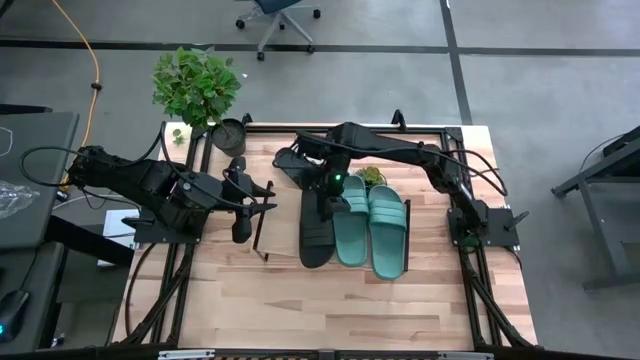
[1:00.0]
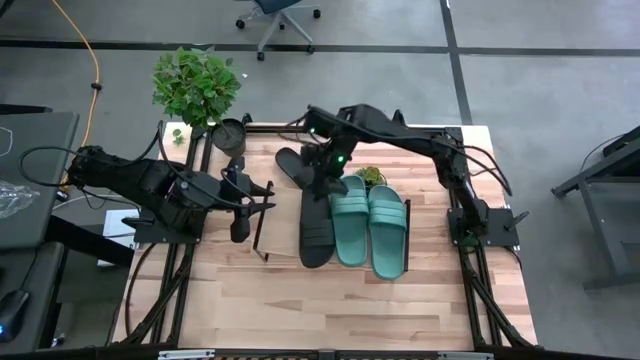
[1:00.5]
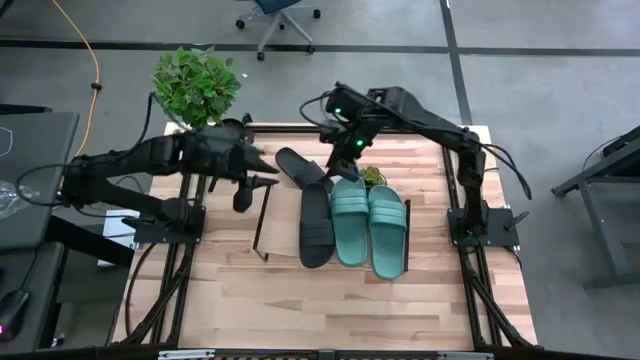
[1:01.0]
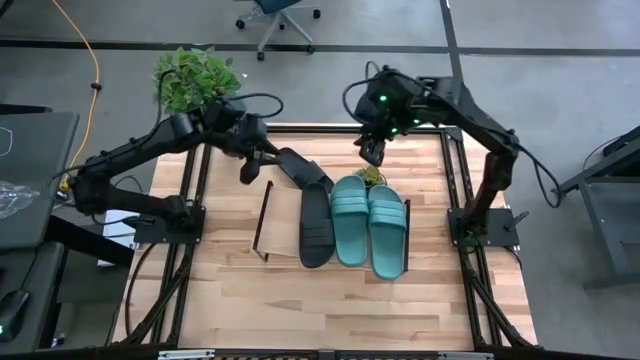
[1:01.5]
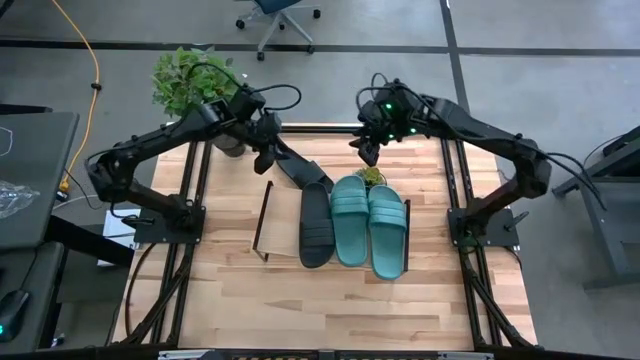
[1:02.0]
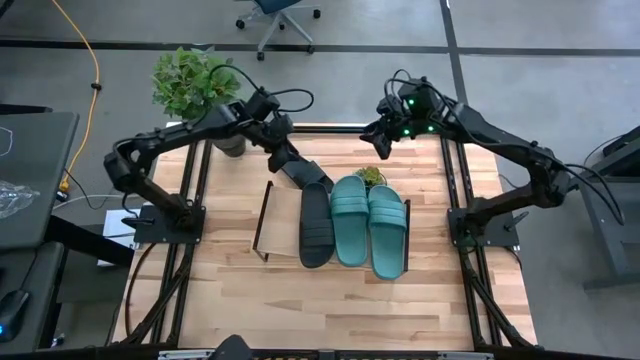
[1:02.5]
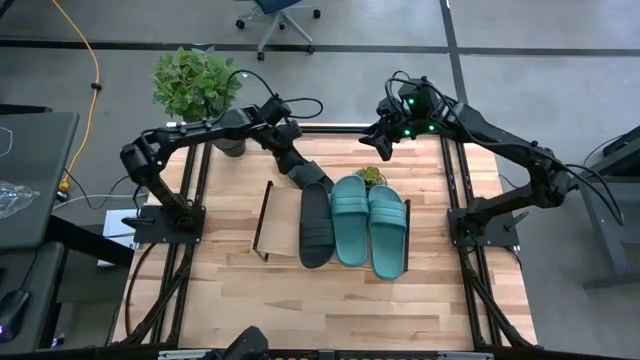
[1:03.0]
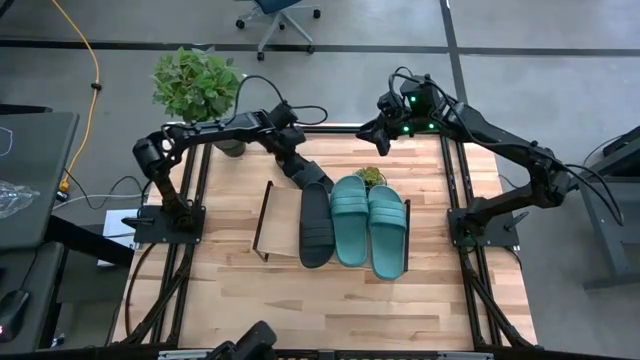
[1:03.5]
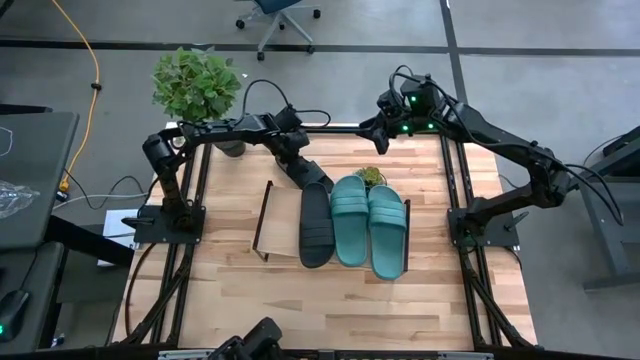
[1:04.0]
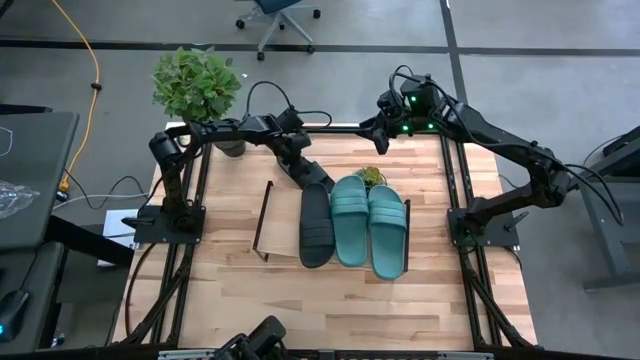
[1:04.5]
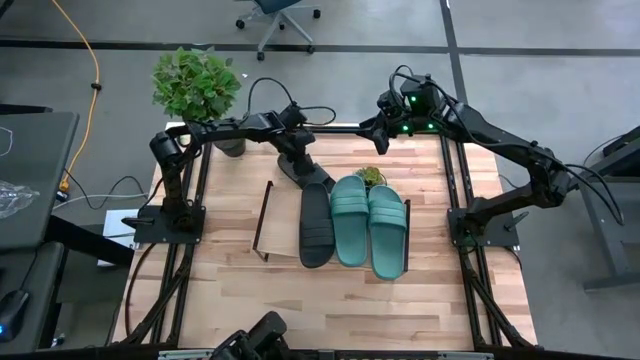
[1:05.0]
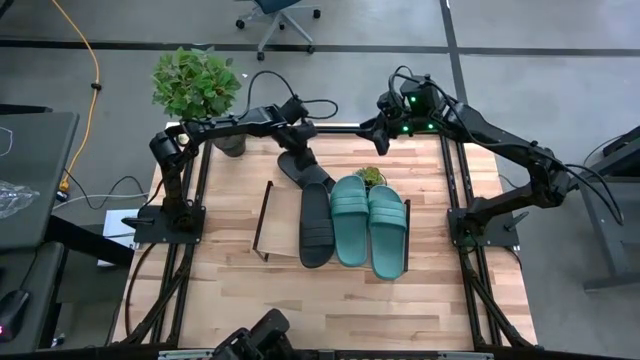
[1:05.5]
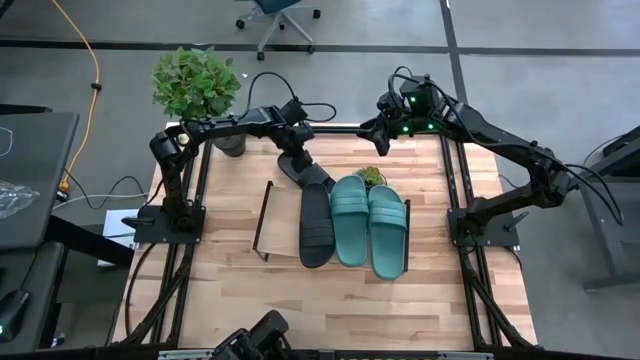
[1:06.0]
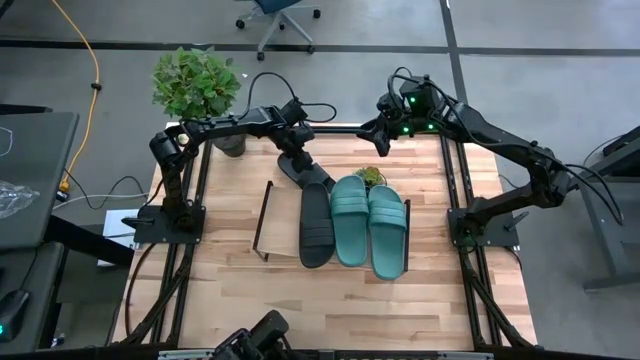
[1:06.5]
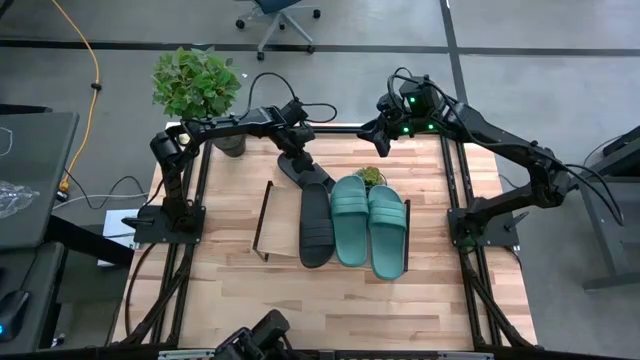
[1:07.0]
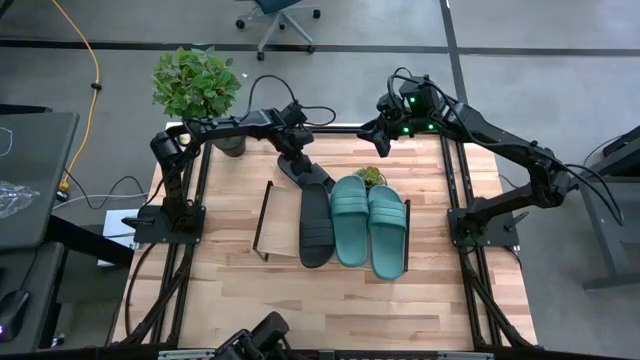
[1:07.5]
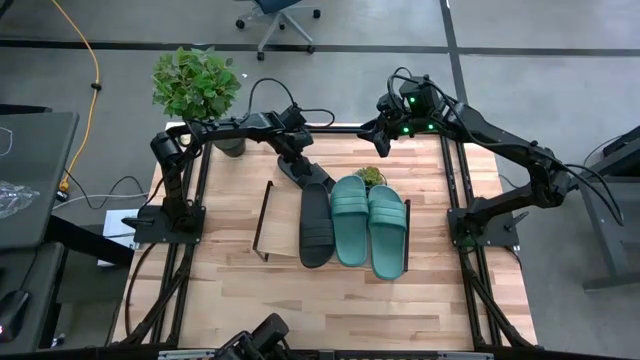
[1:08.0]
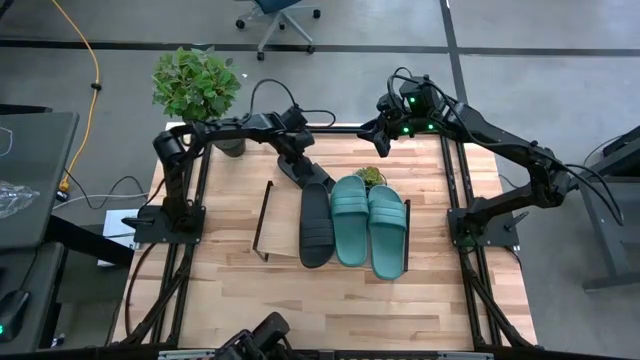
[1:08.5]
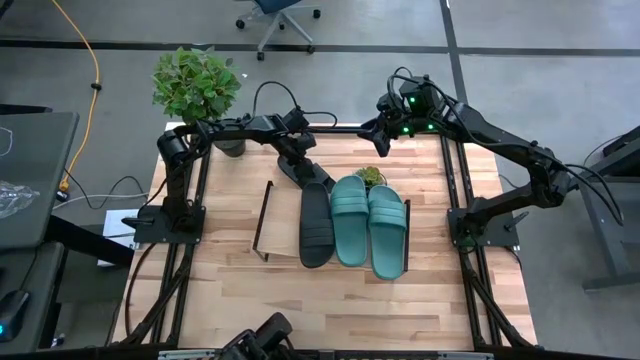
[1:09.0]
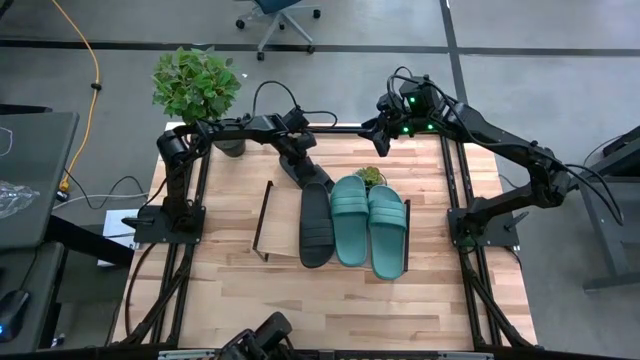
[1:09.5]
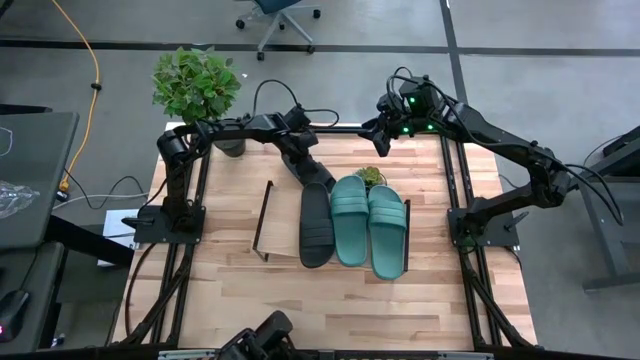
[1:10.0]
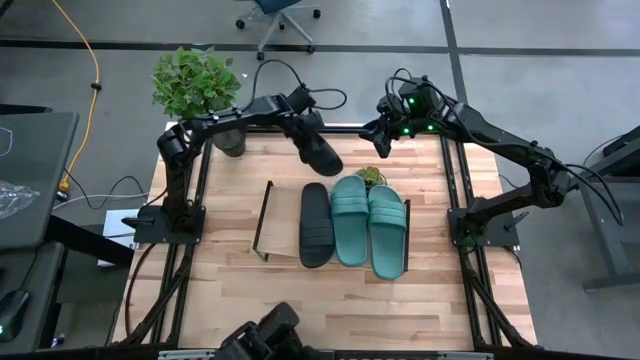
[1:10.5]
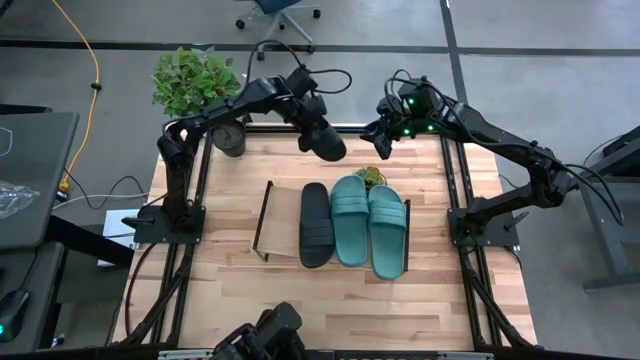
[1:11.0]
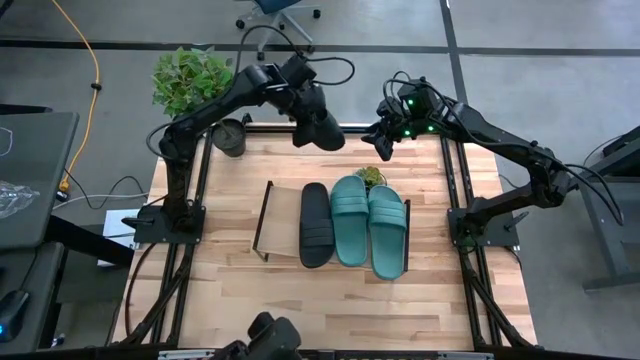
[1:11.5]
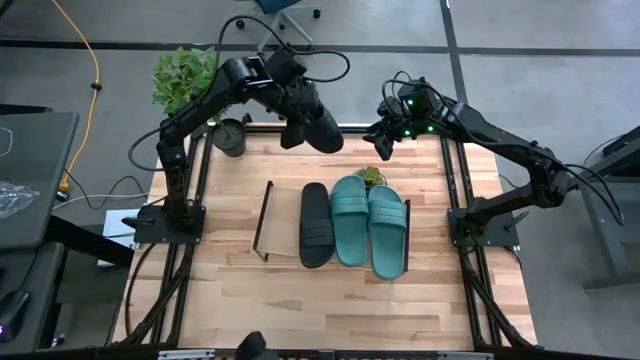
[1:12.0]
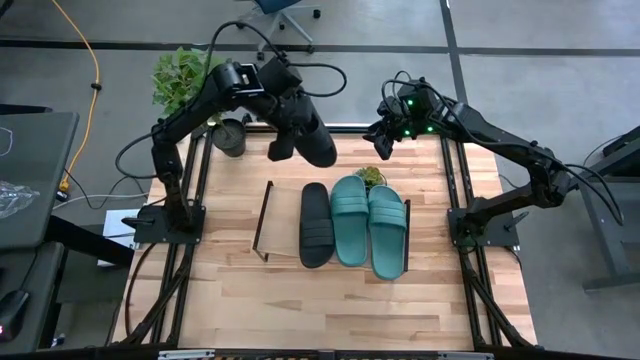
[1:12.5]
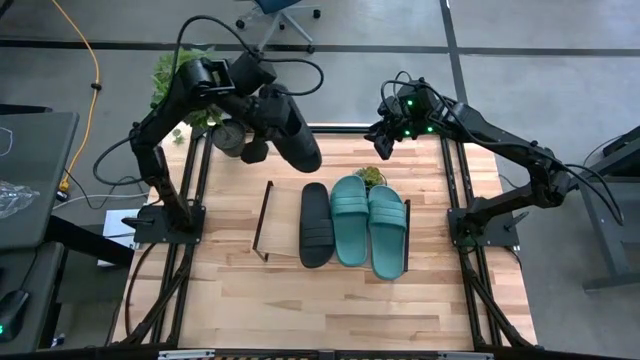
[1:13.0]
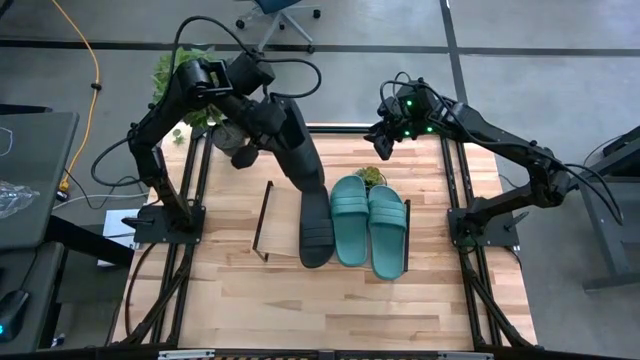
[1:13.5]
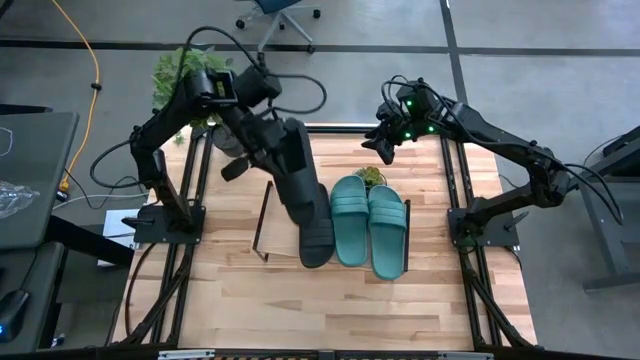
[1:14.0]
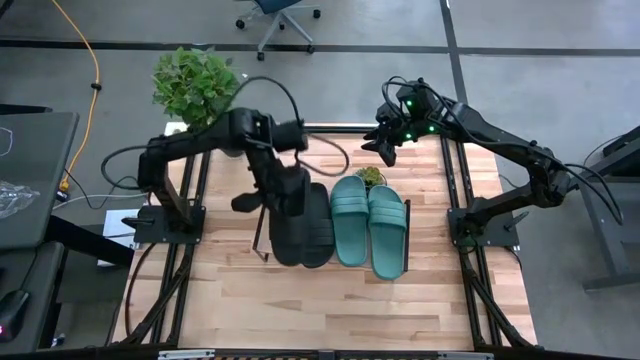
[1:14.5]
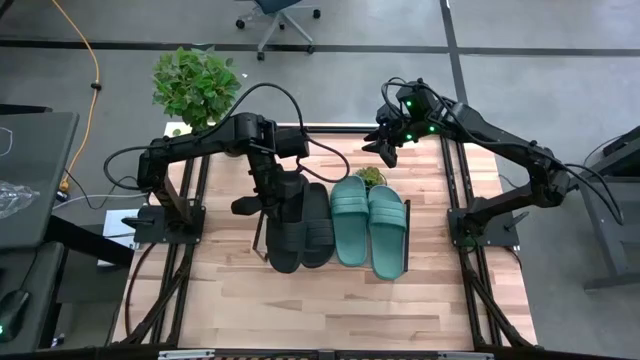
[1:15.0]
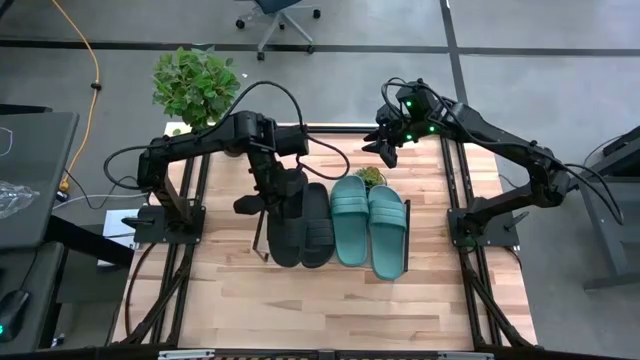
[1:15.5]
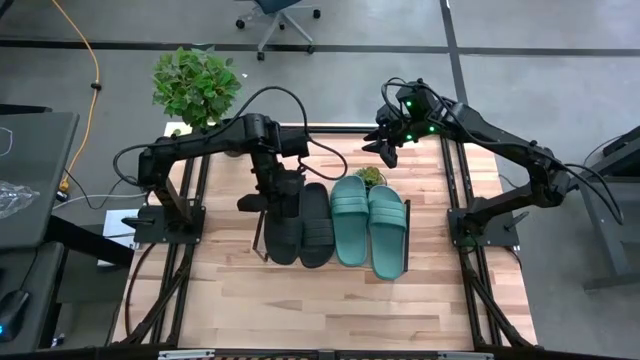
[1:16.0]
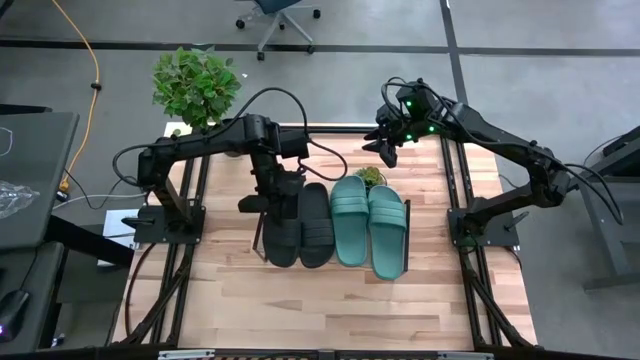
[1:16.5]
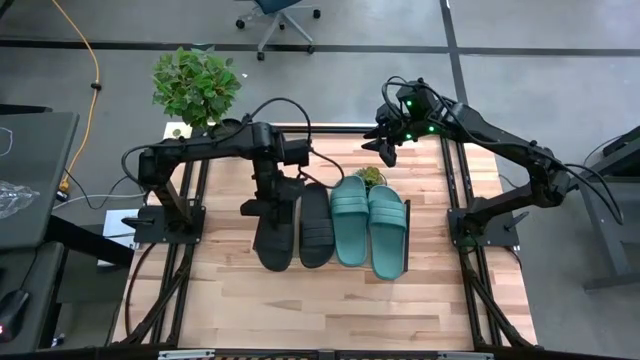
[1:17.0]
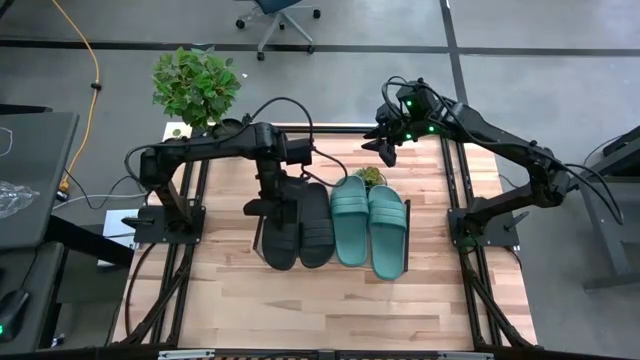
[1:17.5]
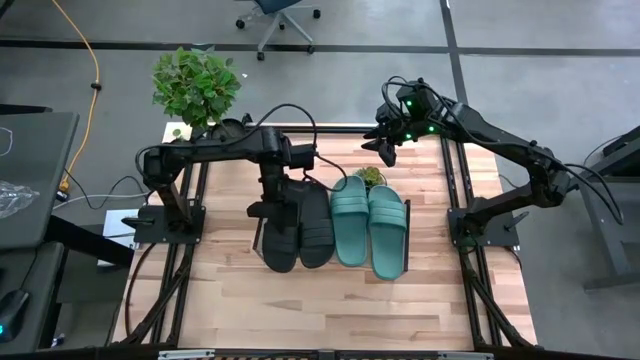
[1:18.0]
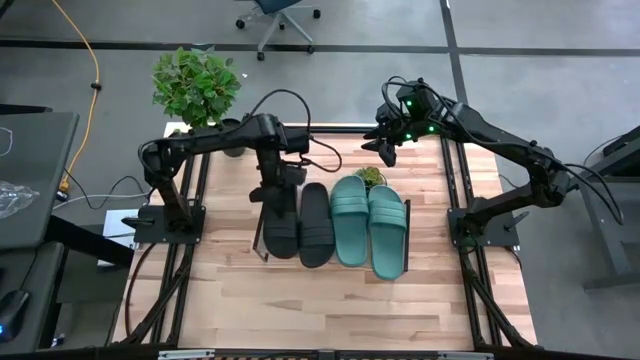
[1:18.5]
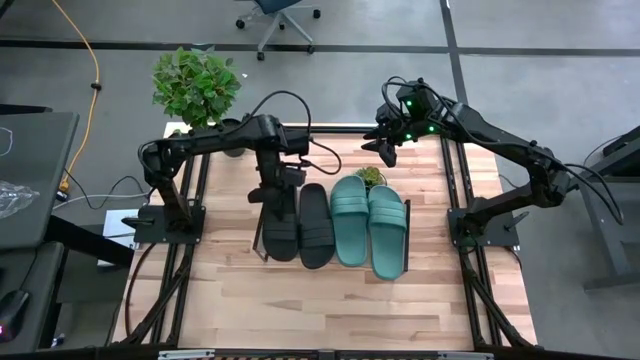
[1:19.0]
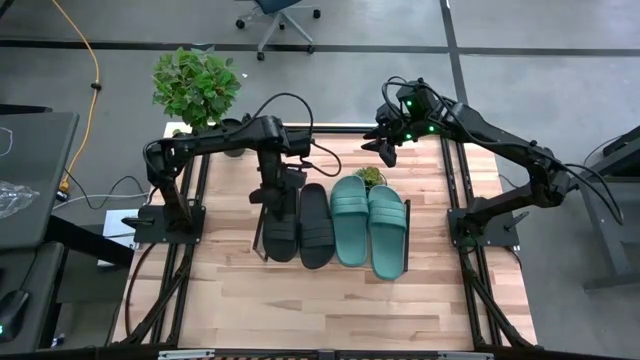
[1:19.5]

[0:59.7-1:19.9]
Task: Pick and place slides into the shelf
Put the black slipper on the shelf

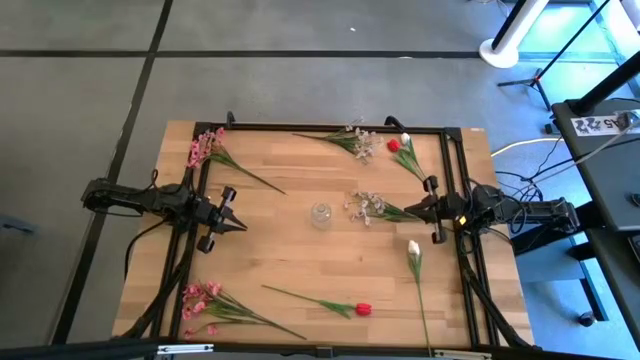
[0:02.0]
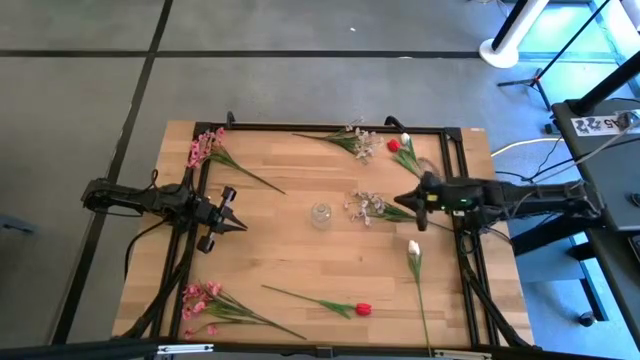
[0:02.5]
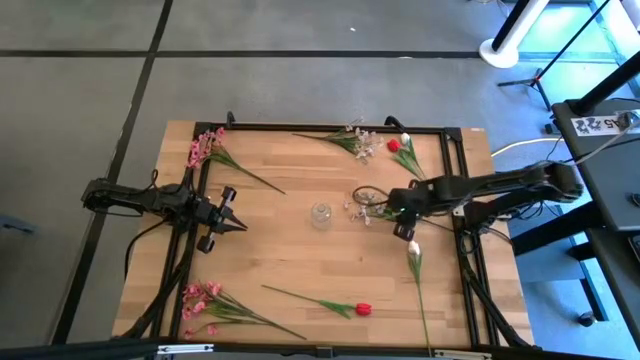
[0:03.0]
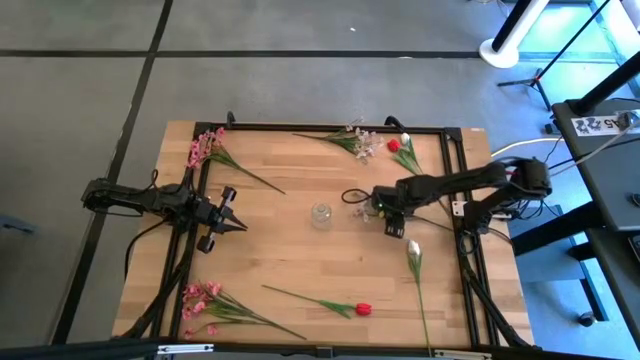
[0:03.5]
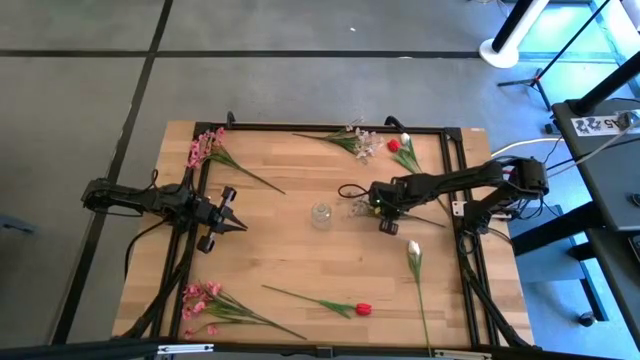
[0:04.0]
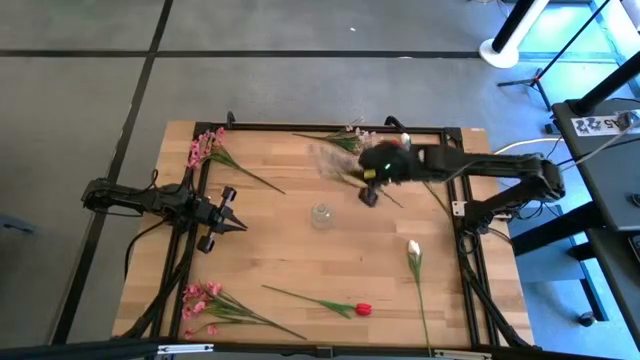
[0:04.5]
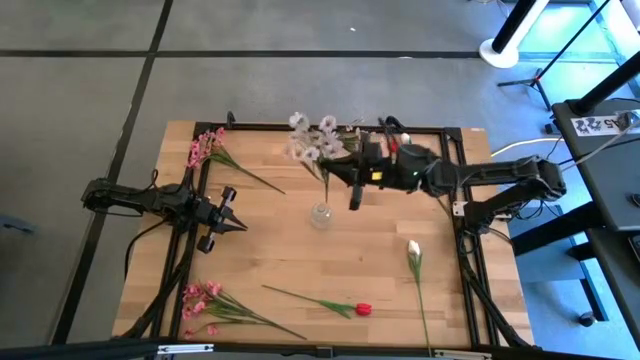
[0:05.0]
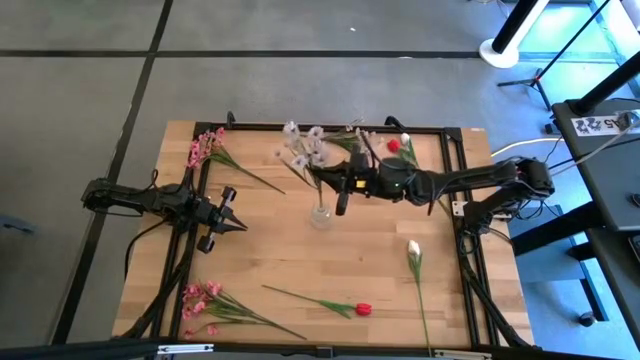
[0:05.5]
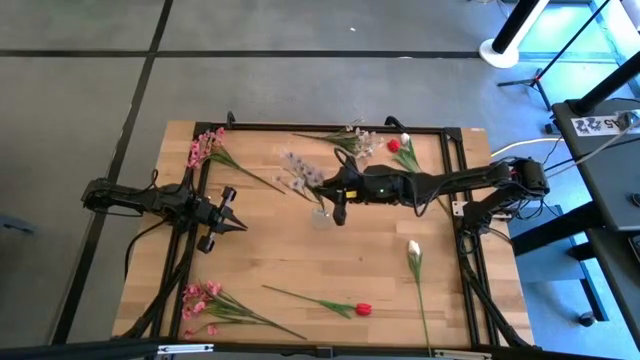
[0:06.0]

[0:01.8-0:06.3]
Task: Sort flowers into vase by color
Put the bottom white flower into the transparent vase
